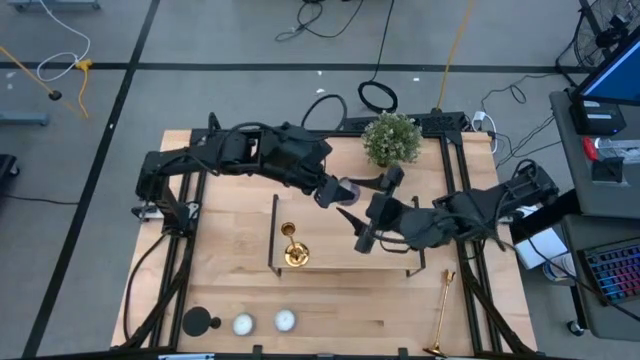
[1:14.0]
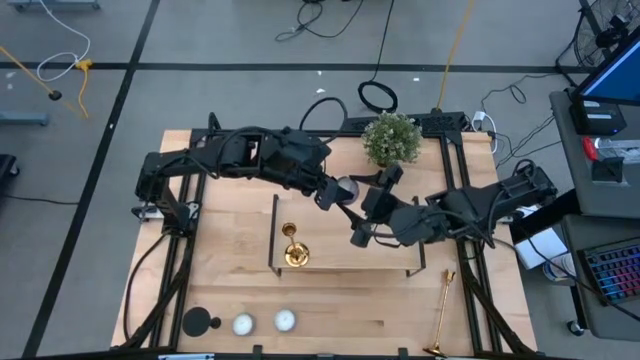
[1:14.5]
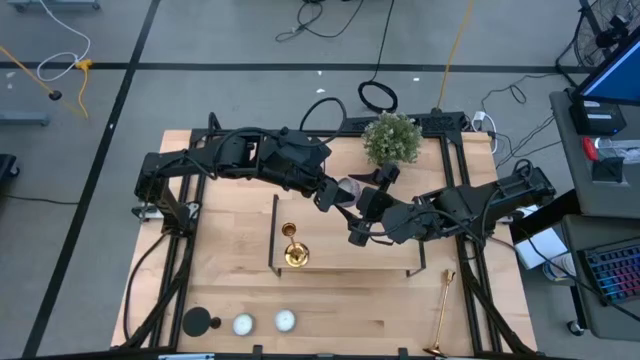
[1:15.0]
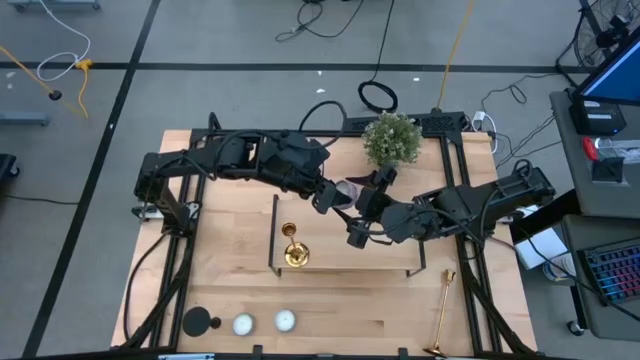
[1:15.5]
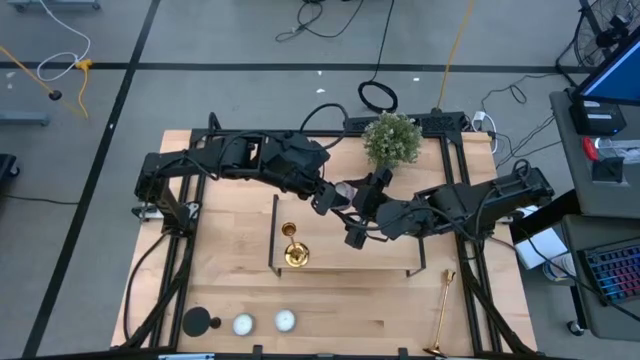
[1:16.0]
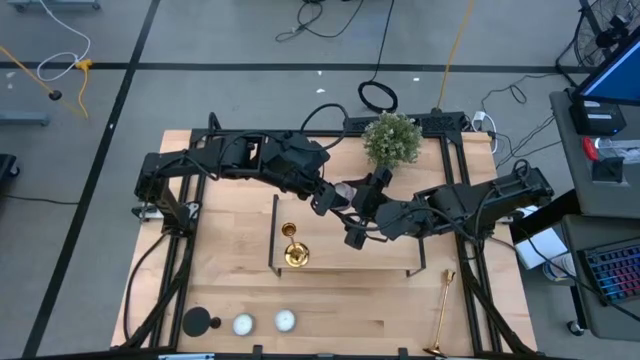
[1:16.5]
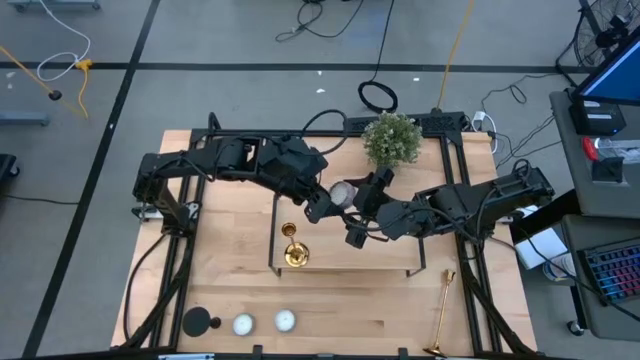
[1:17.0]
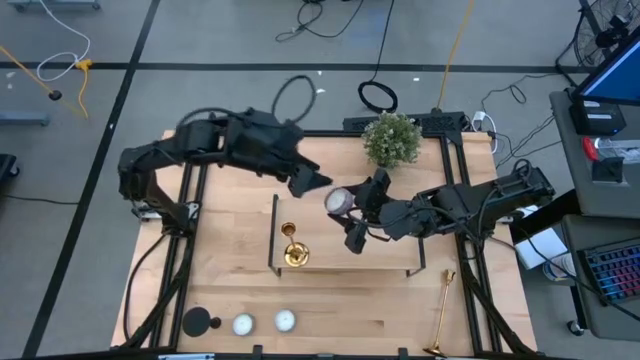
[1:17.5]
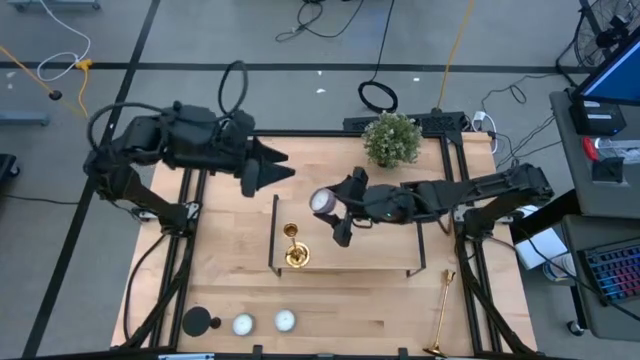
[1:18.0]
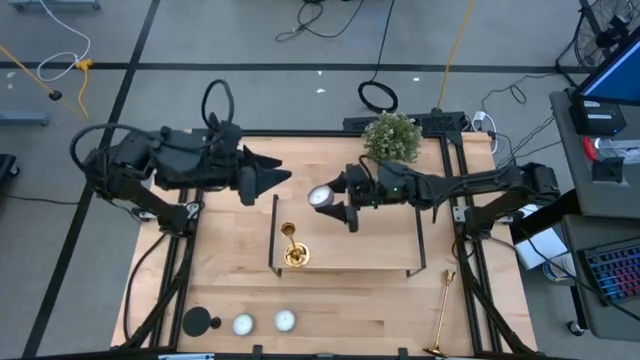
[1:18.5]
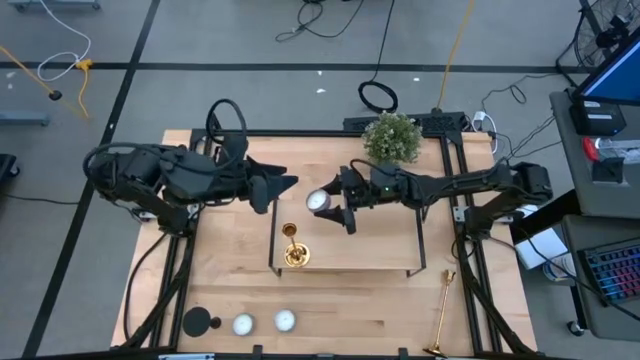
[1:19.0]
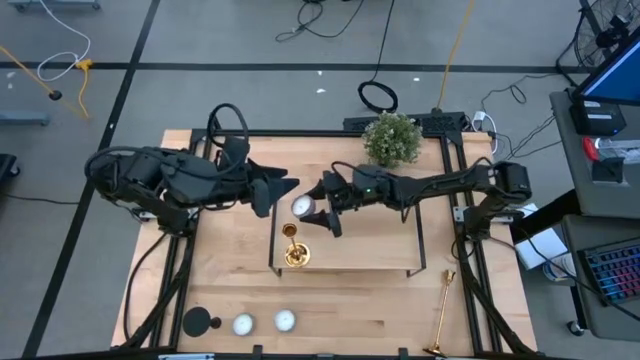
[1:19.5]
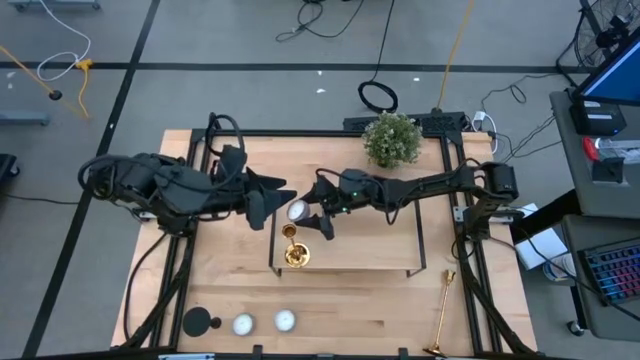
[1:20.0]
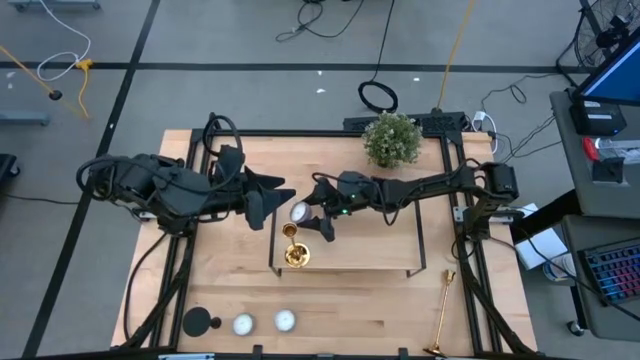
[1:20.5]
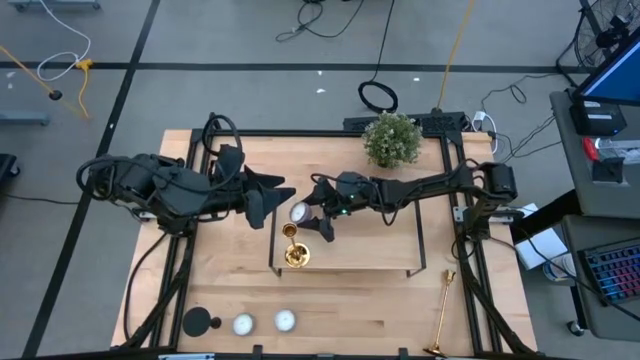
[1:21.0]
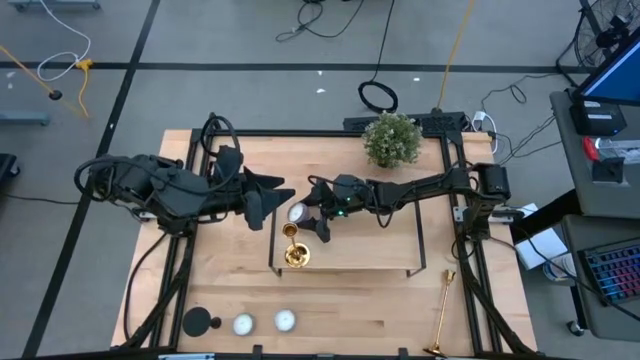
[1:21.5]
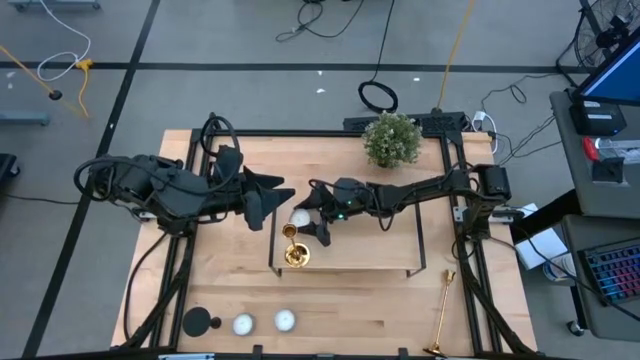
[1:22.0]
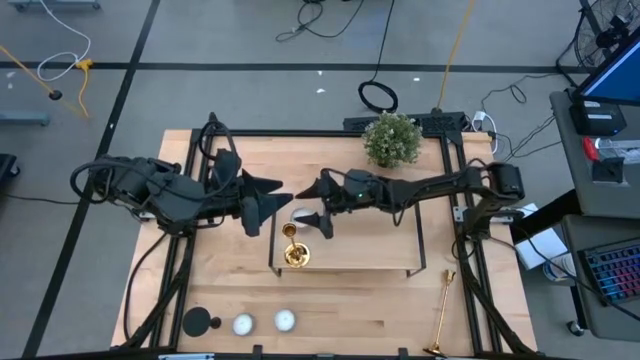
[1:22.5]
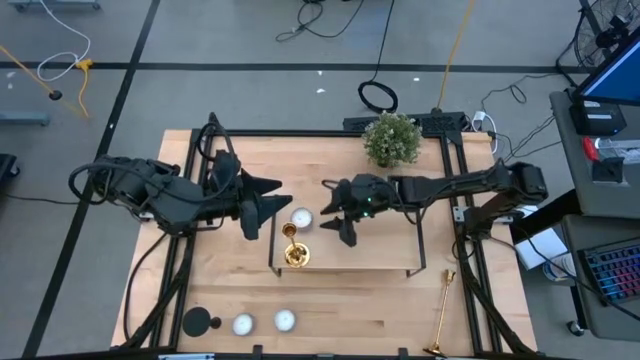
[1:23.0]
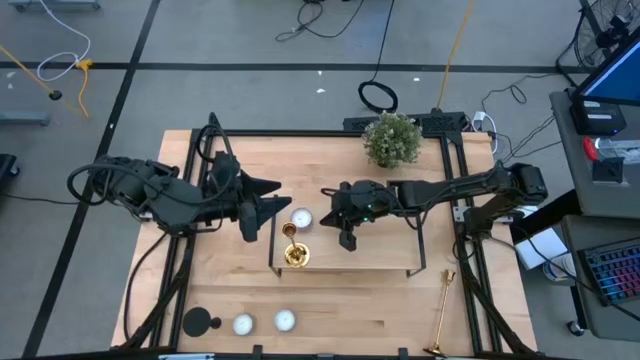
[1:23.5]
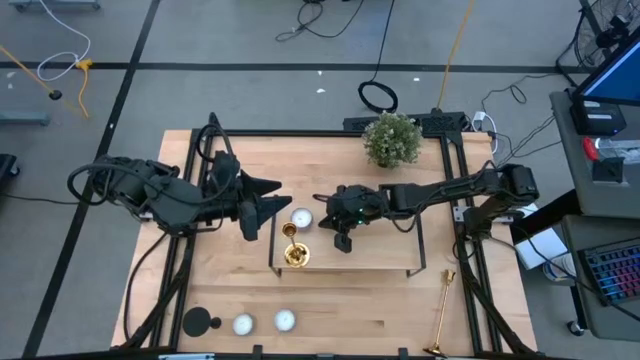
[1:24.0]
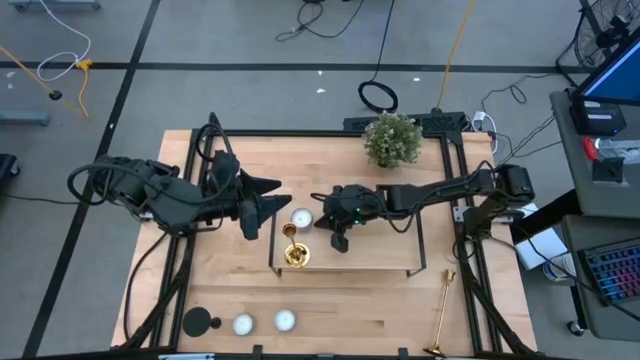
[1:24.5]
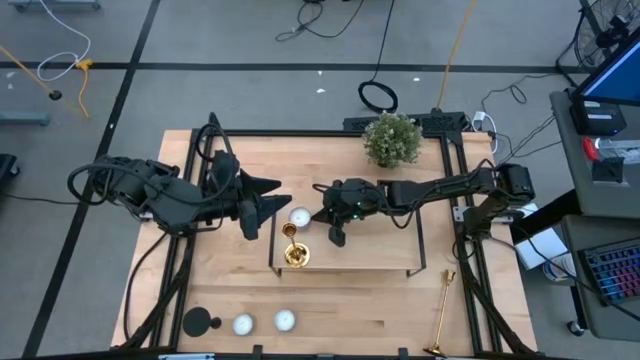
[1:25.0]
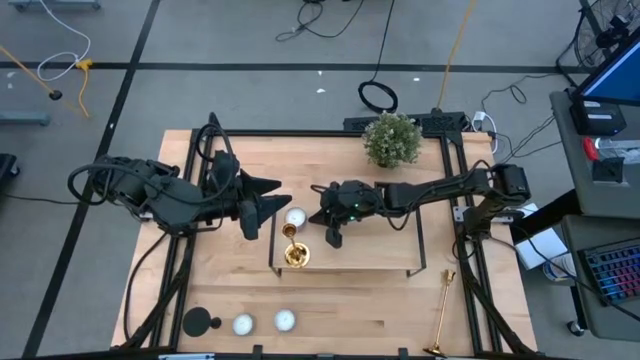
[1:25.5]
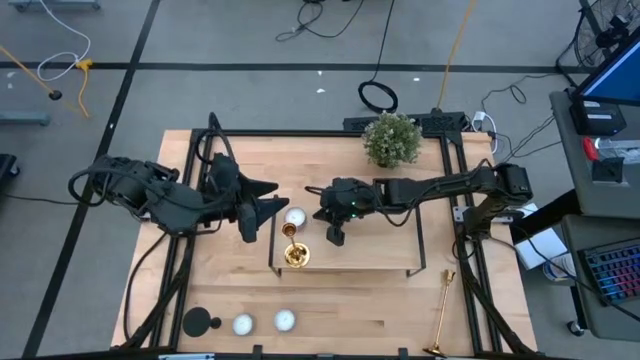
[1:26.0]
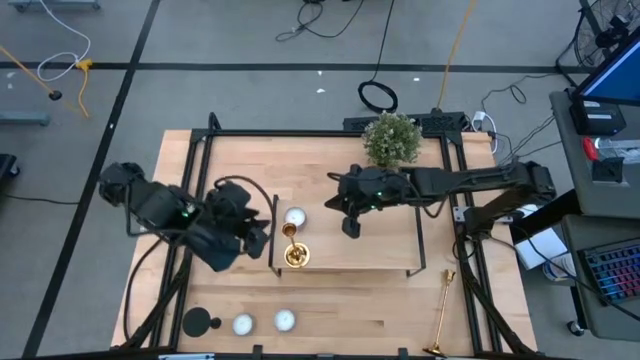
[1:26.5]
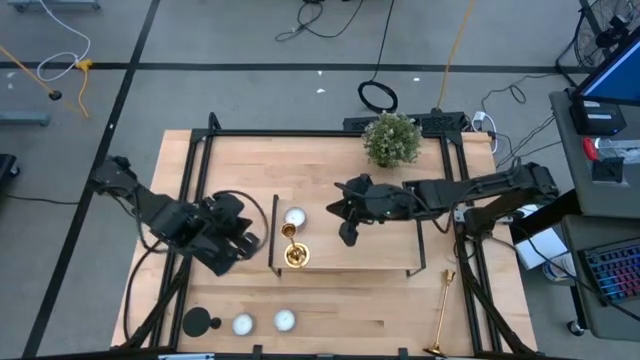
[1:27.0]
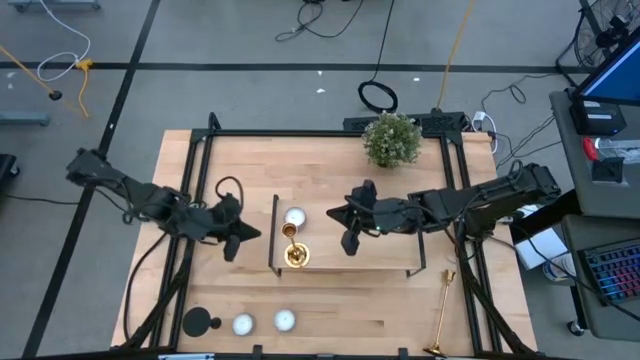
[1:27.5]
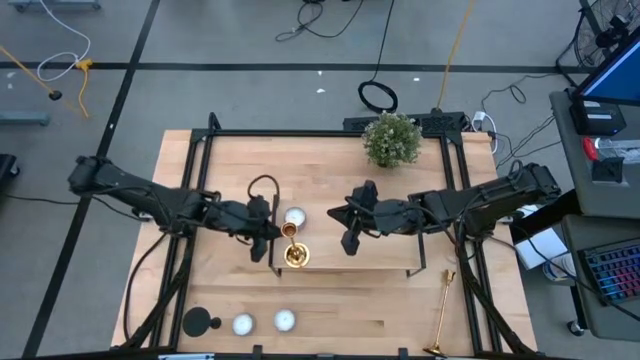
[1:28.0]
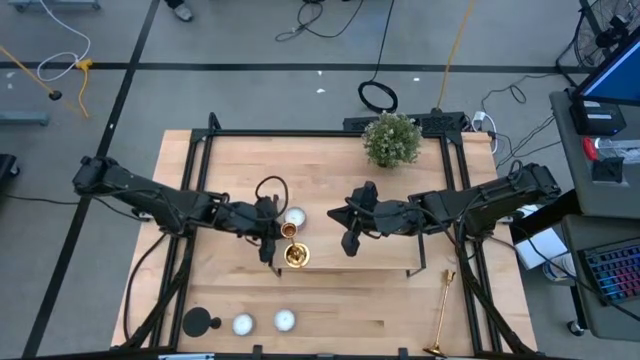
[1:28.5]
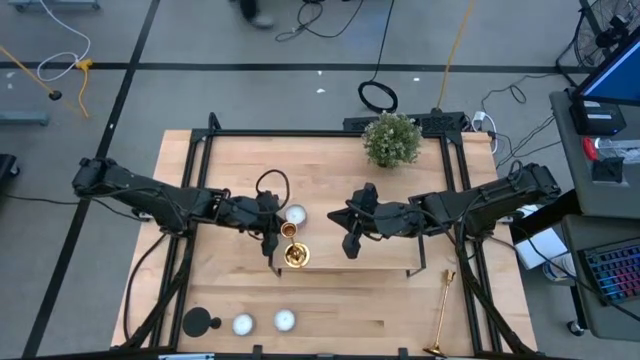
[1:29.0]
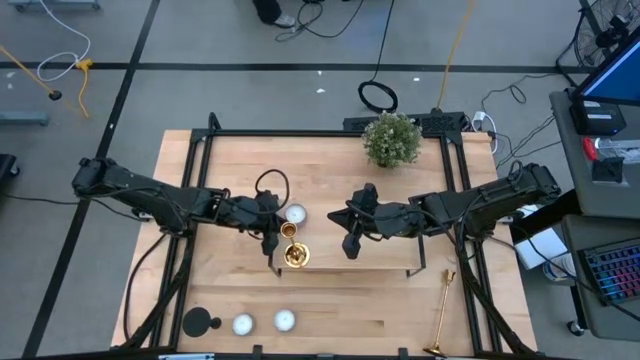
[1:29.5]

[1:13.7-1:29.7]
Task: Pick & Place candle stick holders
Put the pink scented candle on the shelf

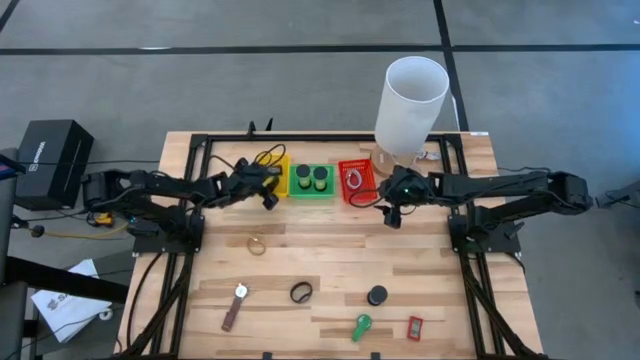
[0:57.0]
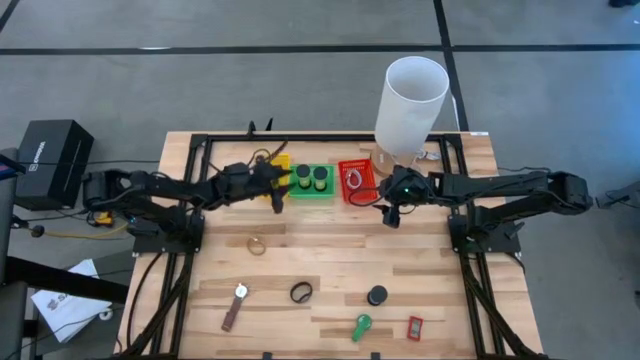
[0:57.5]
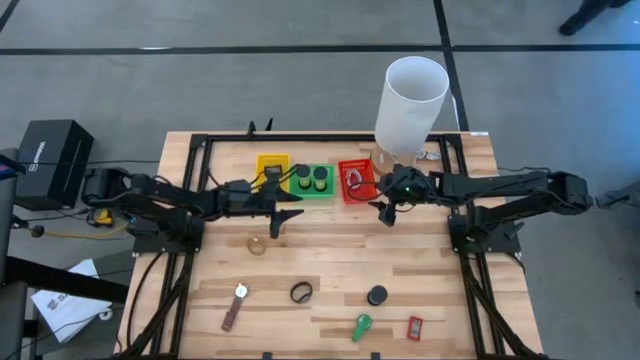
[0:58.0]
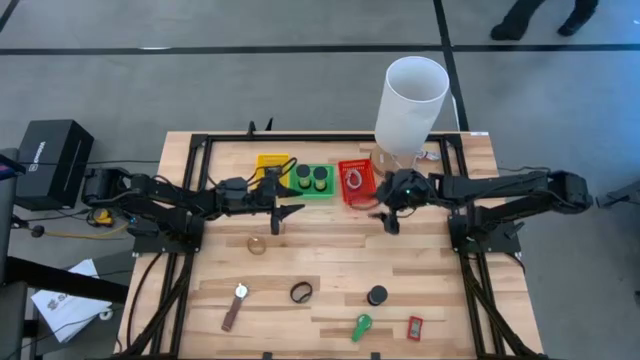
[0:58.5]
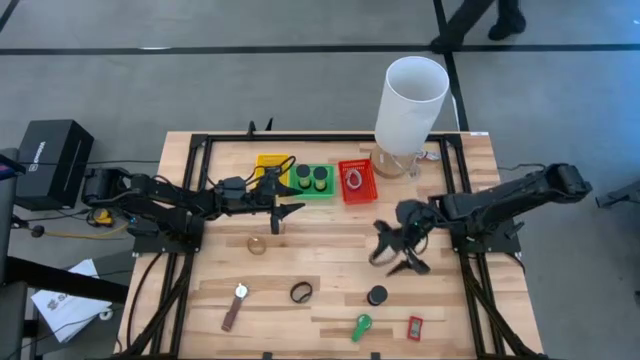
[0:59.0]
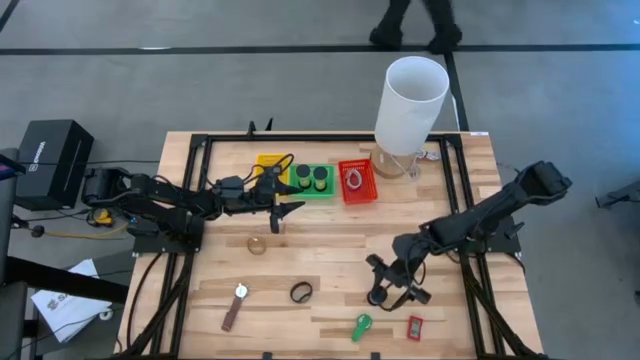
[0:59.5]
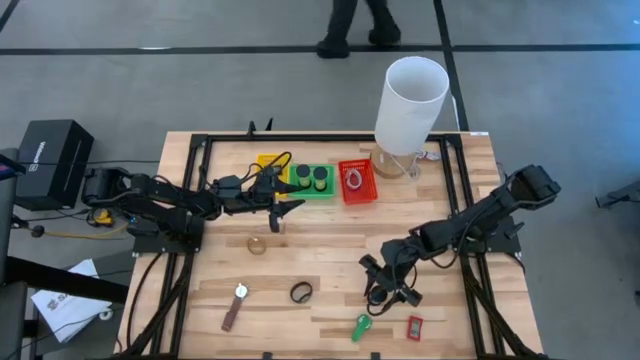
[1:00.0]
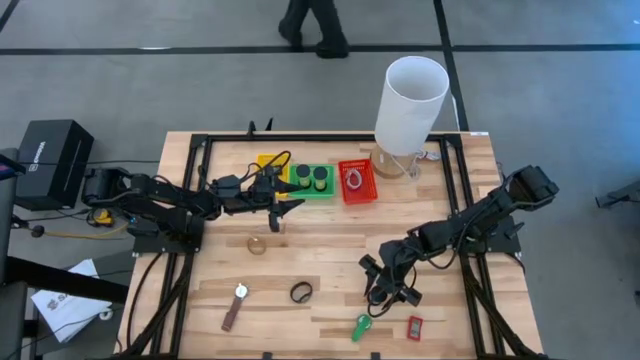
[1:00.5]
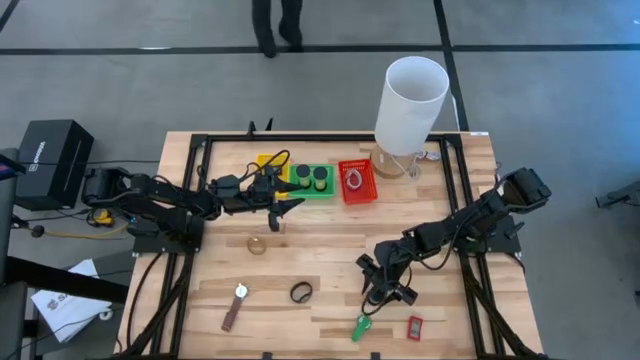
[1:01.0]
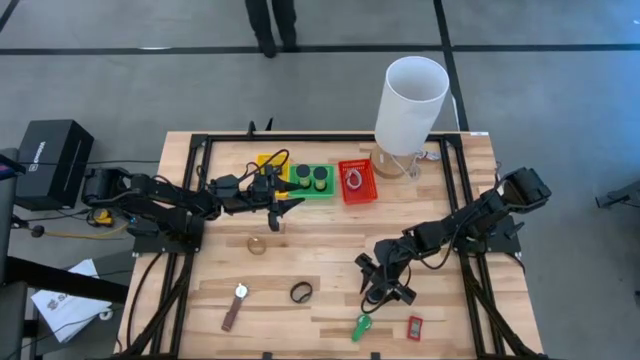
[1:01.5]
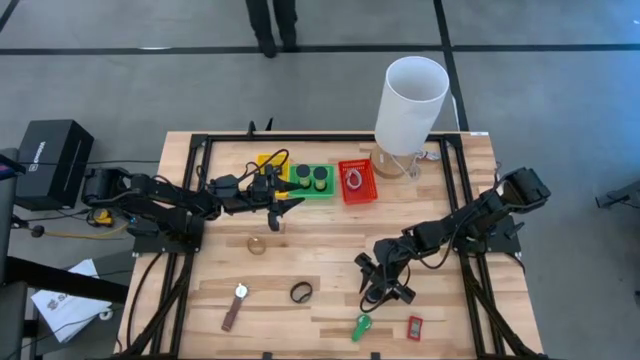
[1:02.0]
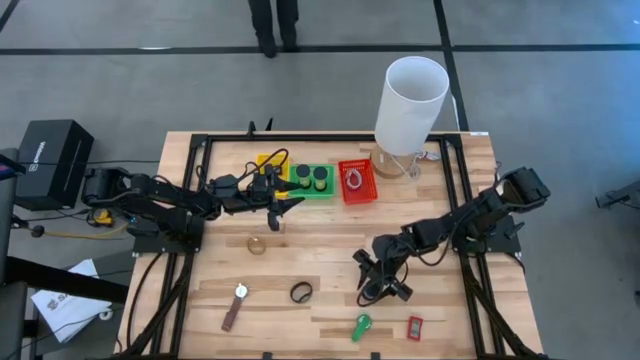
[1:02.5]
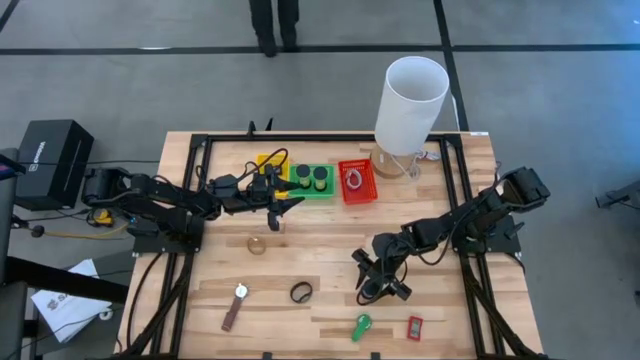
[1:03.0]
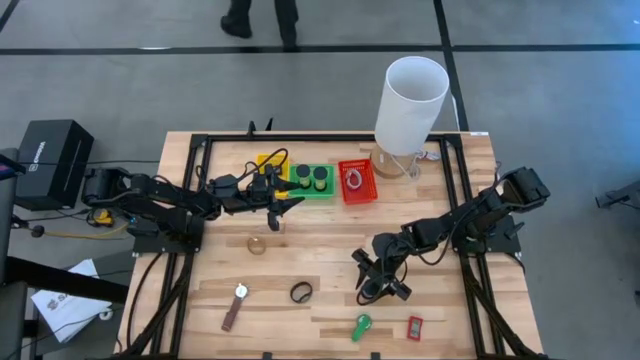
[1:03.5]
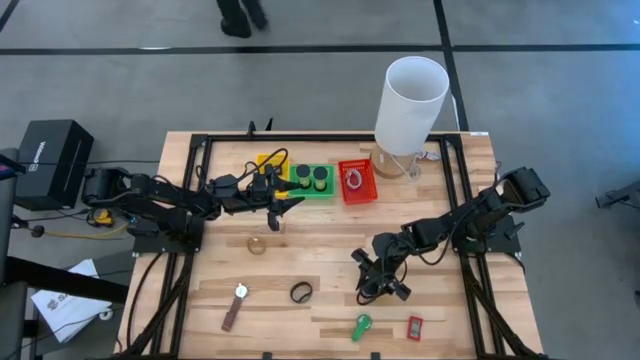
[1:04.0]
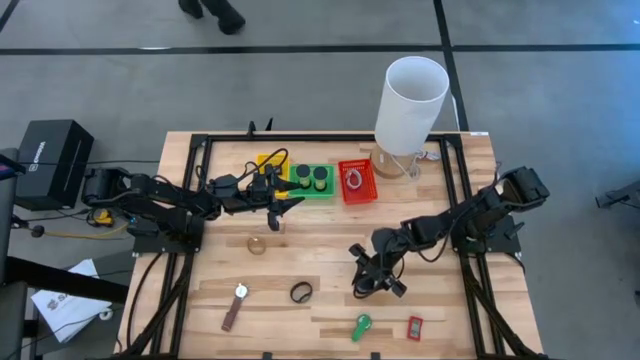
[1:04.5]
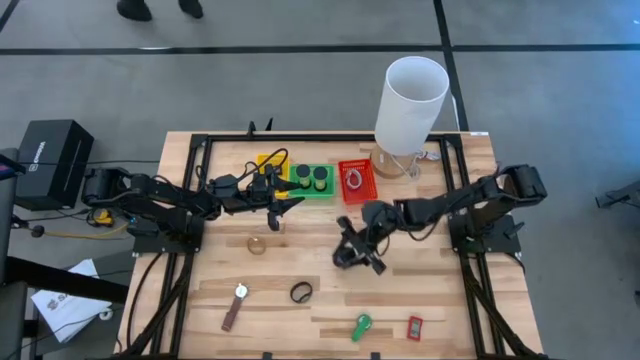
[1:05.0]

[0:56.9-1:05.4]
Task: Pick & Place Office items
Put the blue hourglass into the green basket
